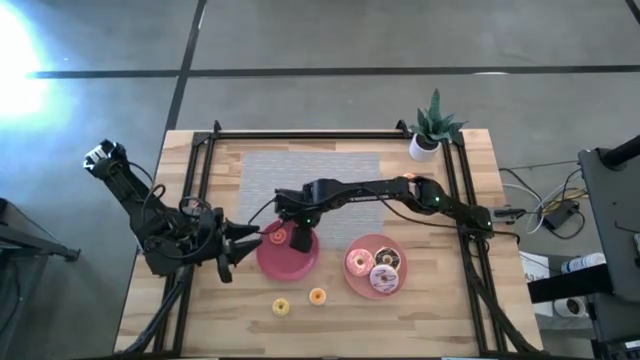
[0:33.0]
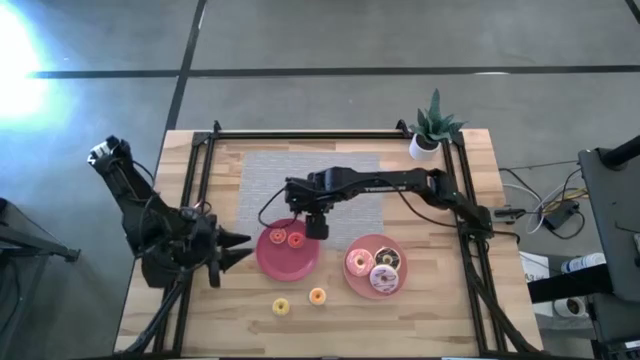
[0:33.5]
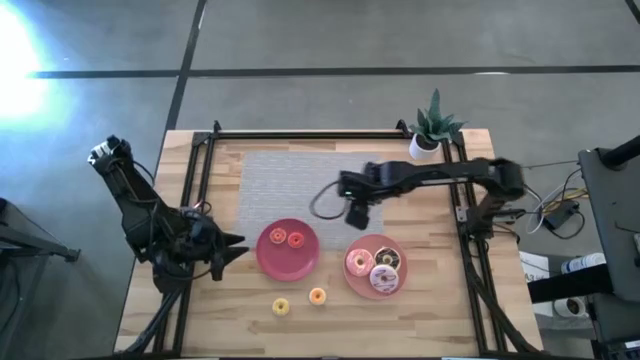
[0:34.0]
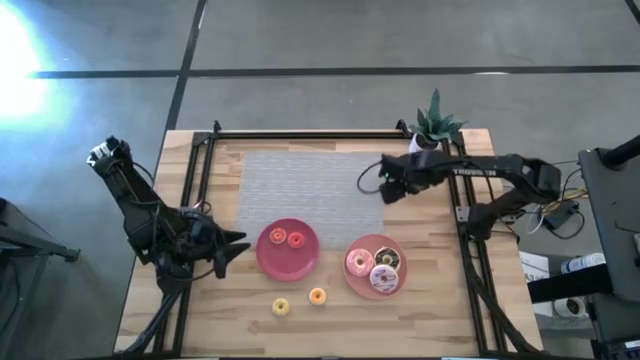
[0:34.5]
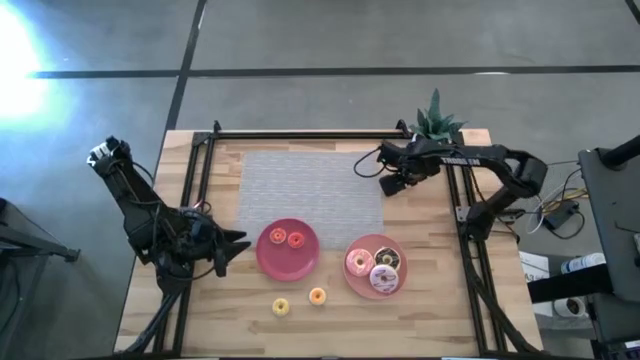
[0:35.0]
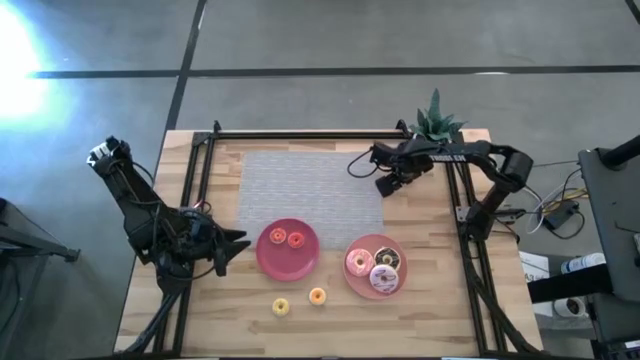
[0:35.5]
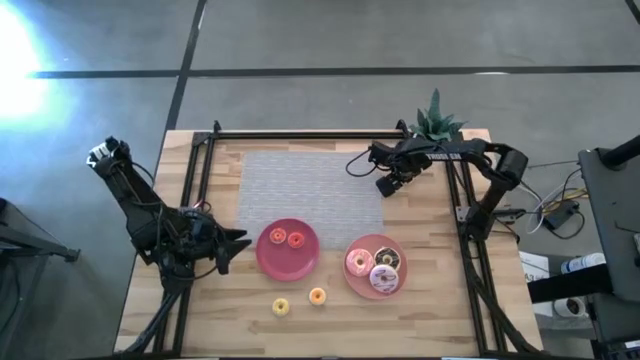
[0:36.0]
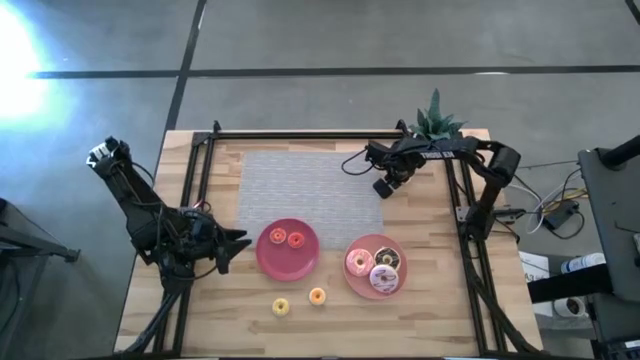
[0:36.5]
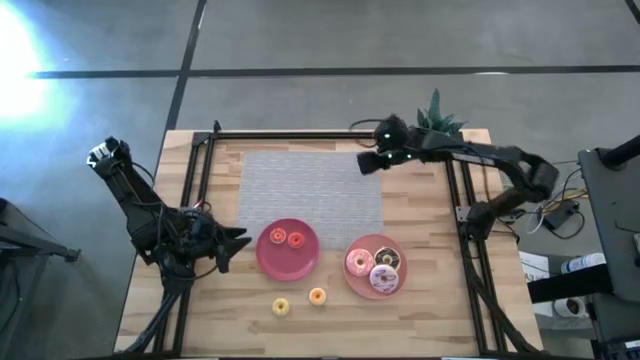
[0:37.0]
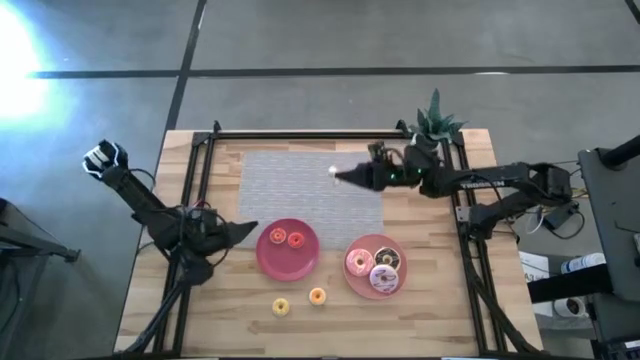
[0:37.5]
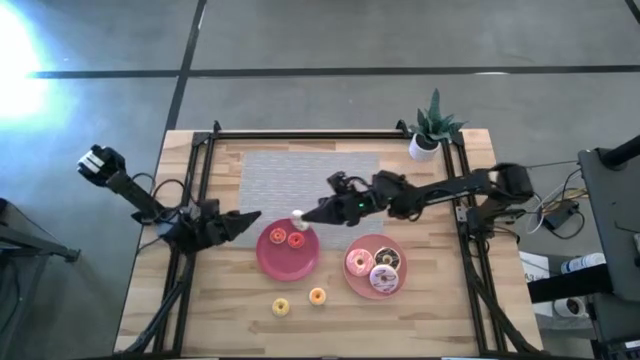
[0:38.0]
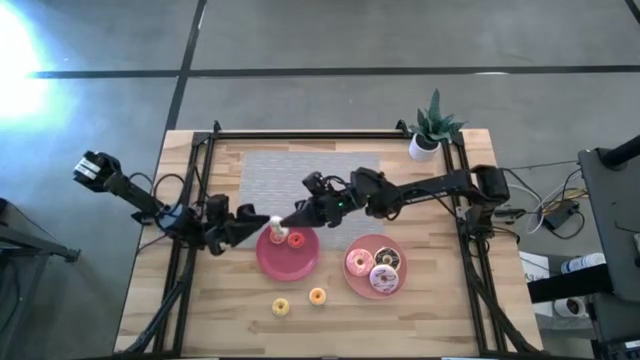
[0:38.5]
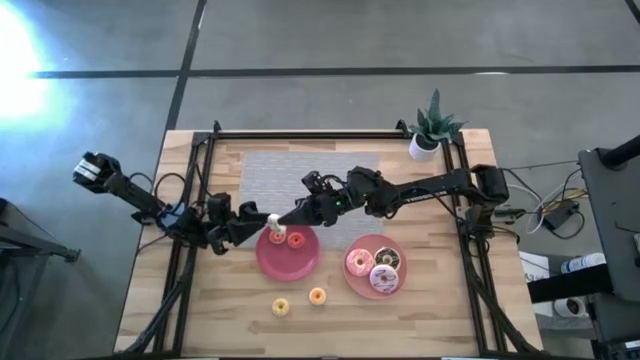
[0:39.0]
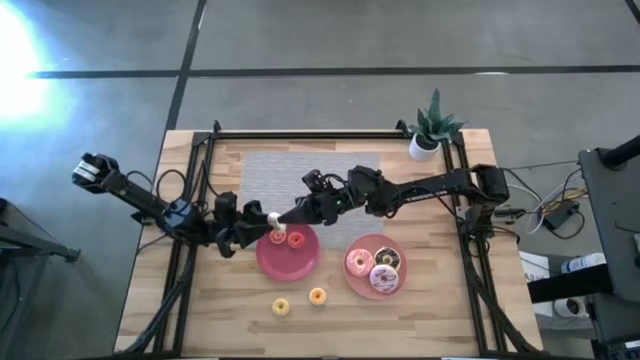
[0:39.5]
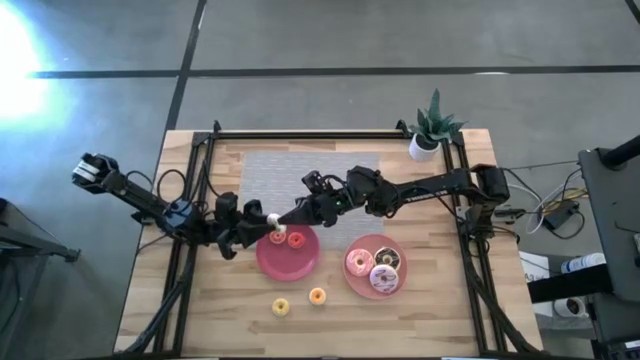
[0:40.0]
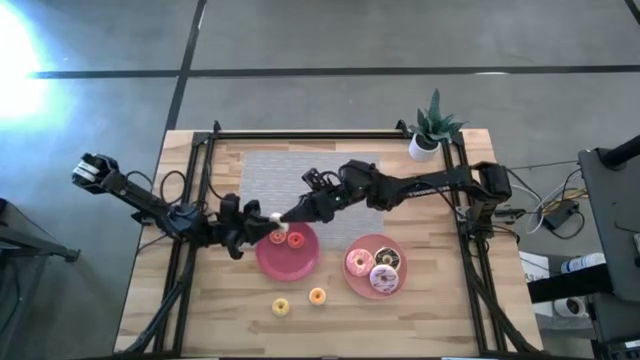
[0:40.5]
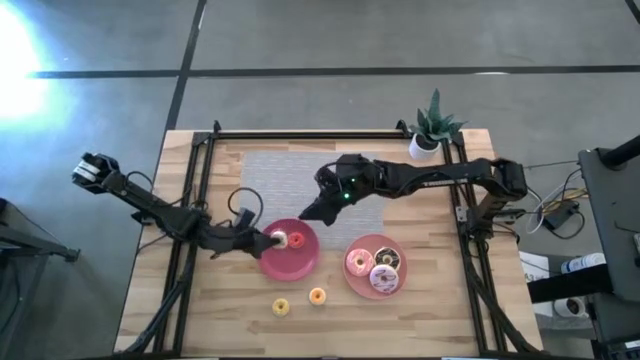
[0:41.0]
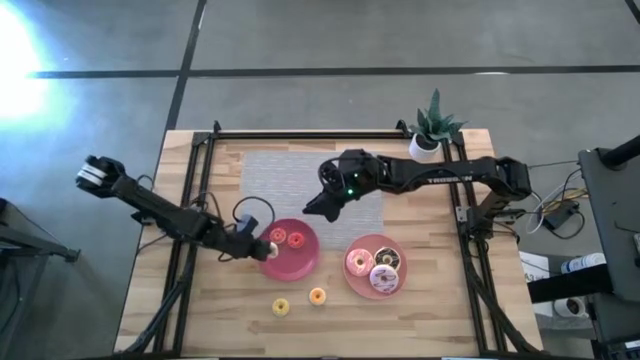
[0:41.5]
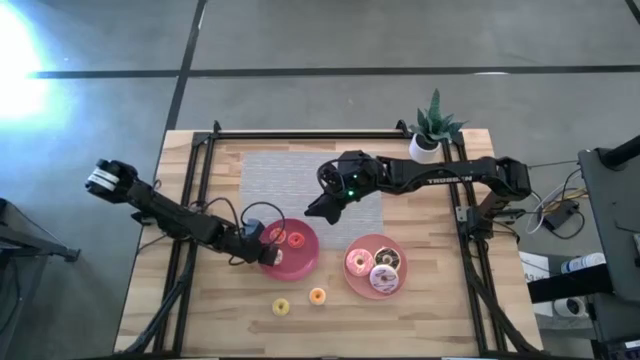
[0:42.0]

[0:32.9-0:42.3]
Task: Pick & Place donuts
Put the white small donut on the dark pink plate

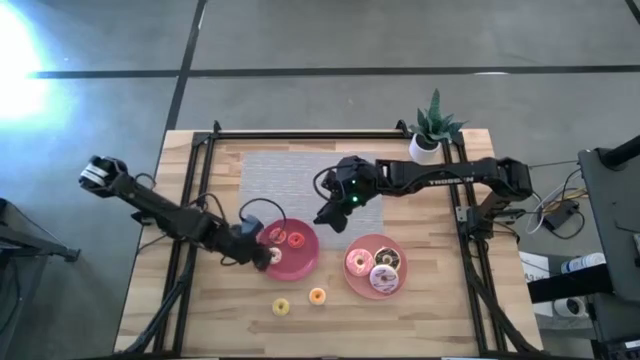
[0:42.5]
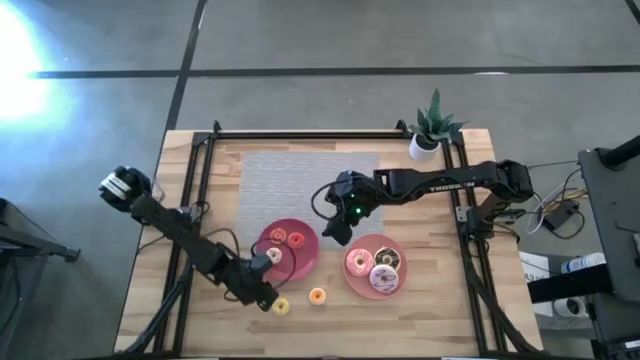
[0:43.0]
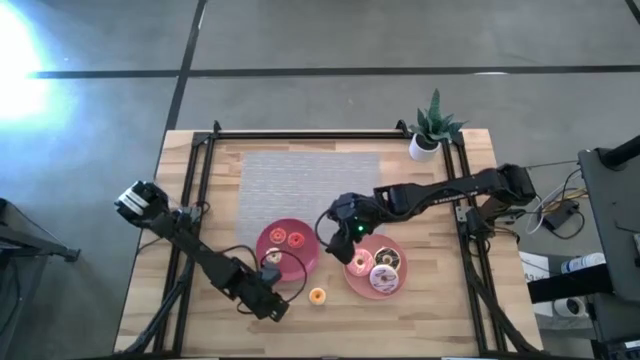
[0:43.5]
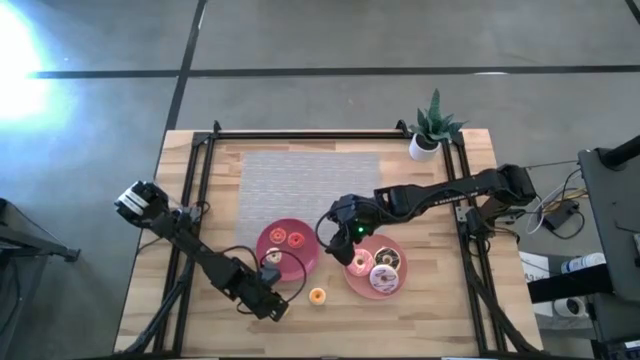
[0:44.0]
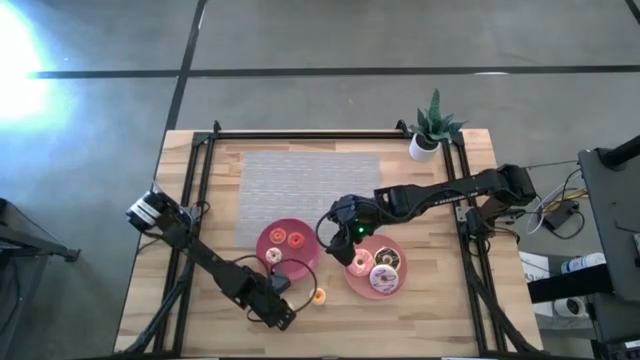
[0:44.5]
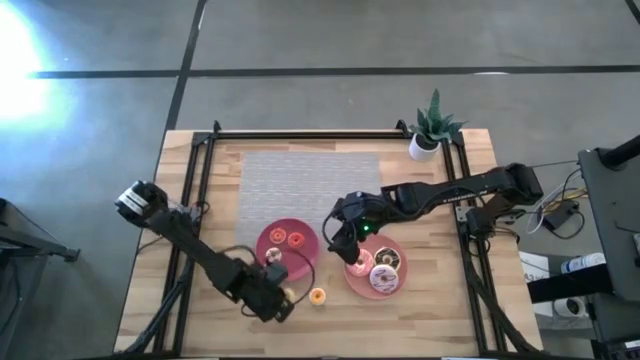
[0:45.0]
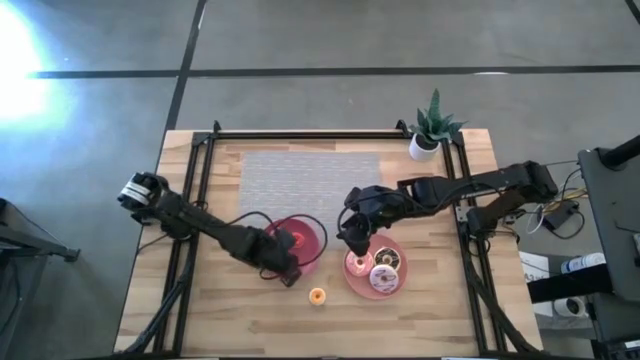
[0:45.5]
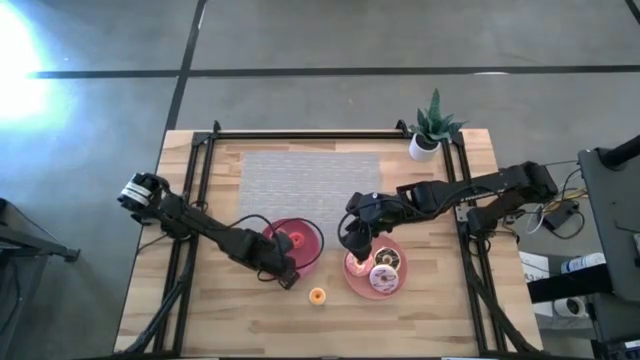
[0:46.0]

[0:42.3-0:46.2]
Put the yellow small donut on the dark pink plate

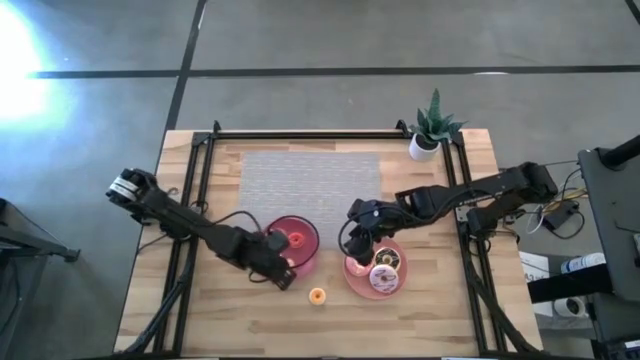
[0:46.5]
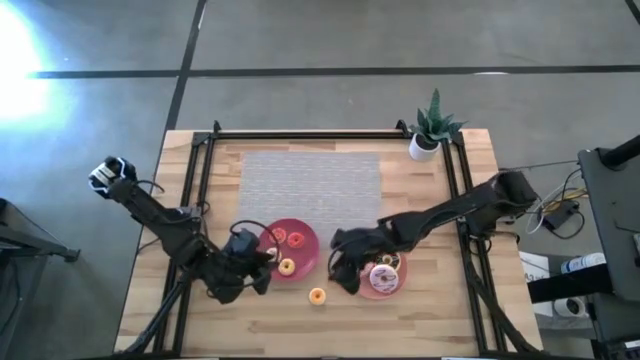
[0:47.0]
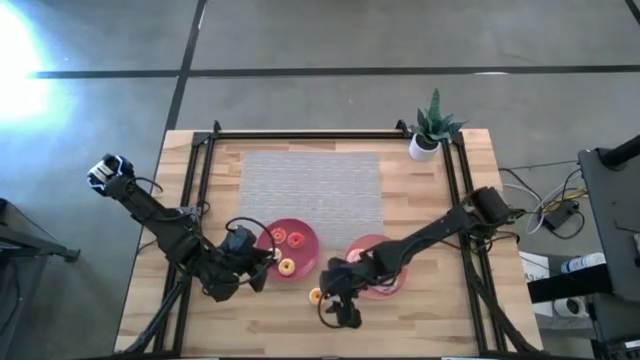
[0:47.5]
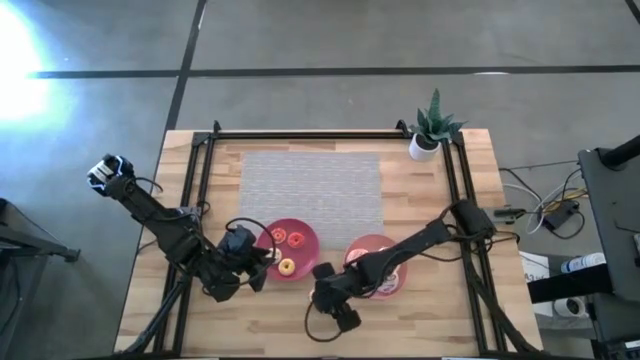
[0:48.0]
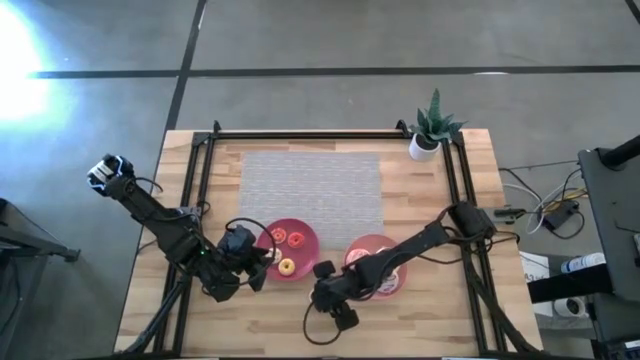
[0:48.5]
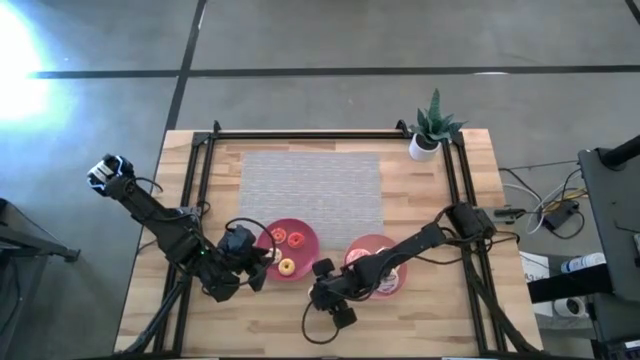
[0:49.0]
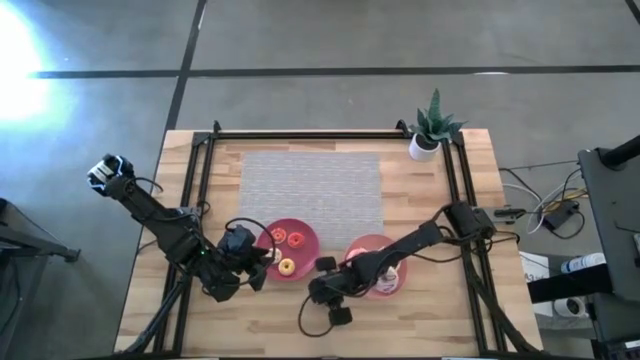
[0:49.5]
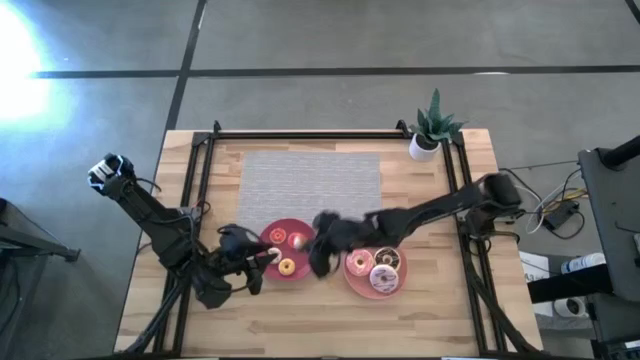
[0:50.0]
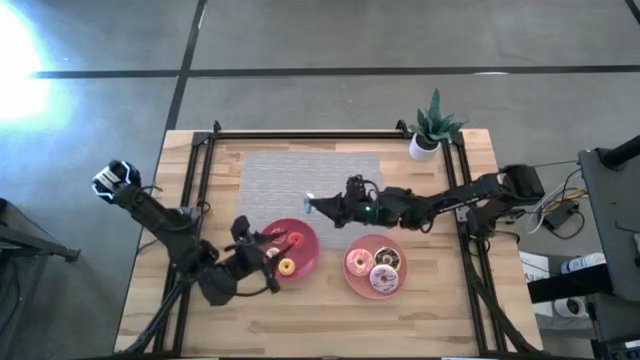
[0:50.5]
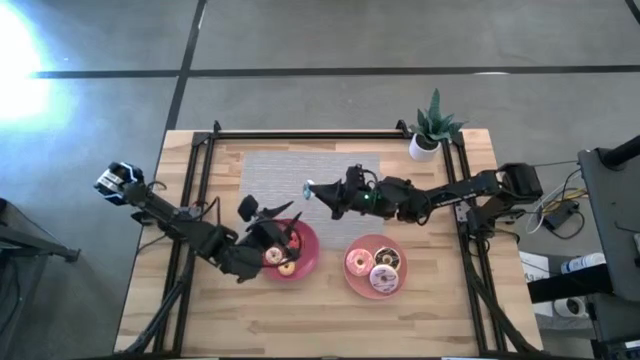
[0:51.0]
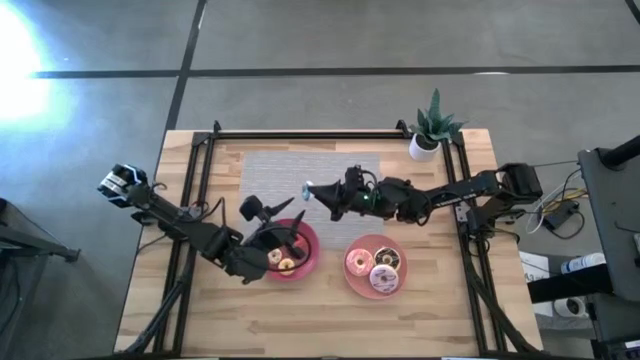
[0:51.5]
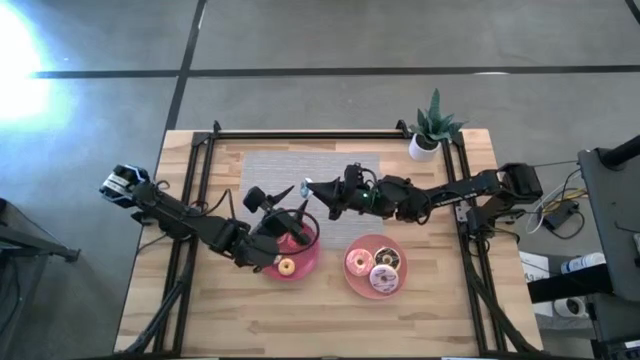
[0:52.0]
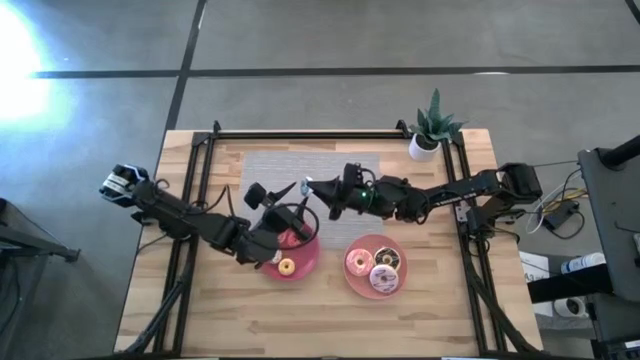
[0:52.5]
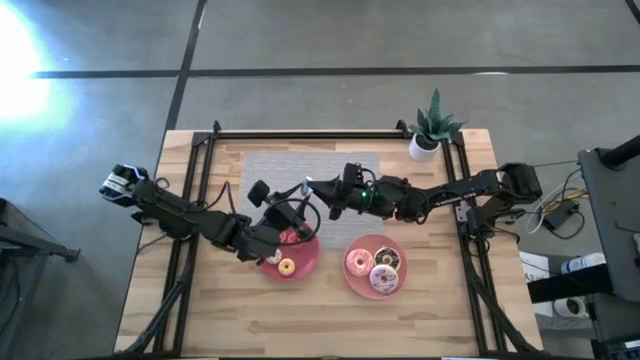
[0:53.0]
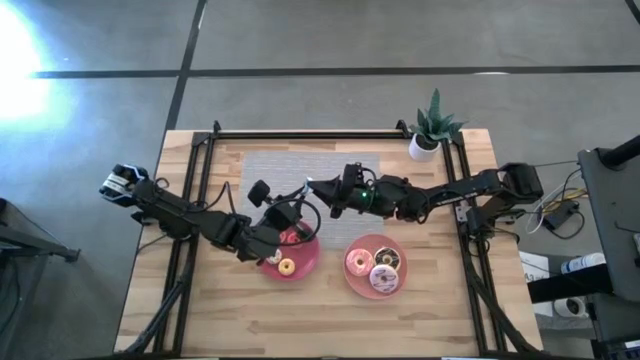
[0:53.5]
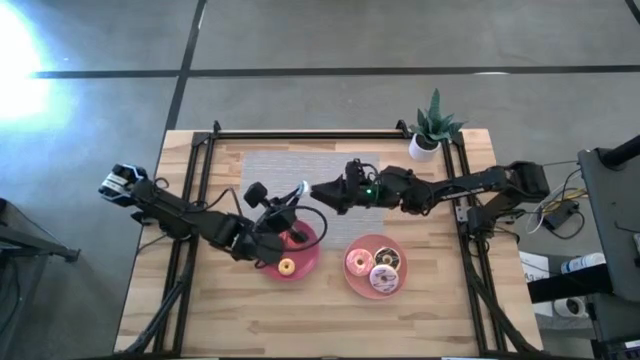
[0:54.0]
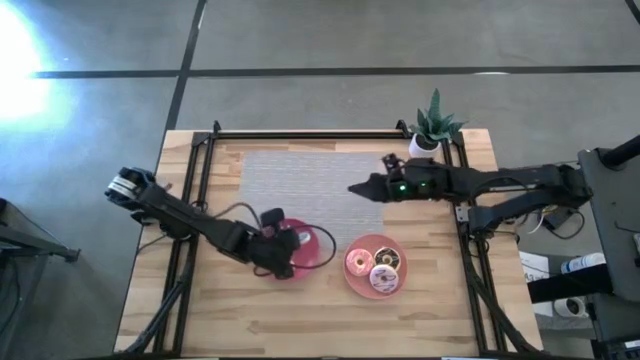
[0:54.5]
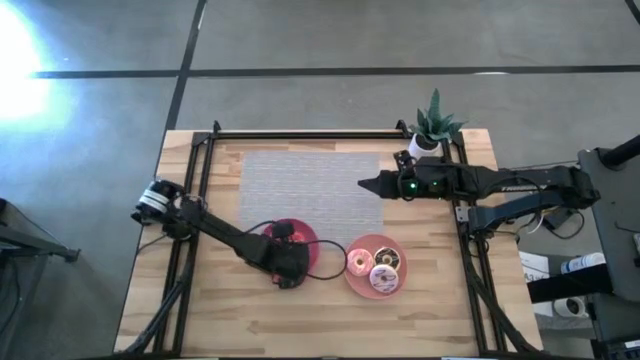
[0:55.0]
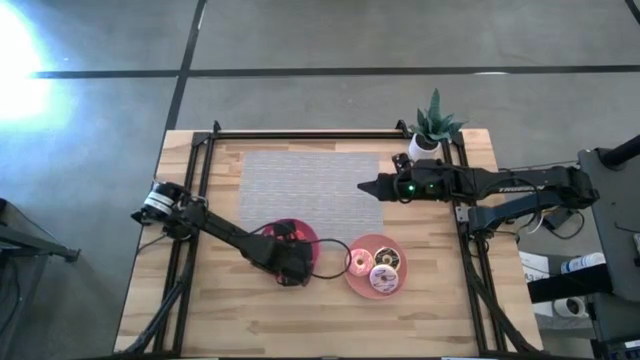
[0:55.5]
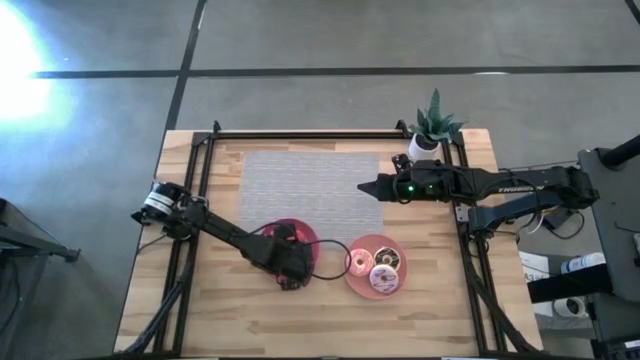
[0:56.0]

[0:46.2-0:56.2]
Put the blue small donut on the dark pink plate
